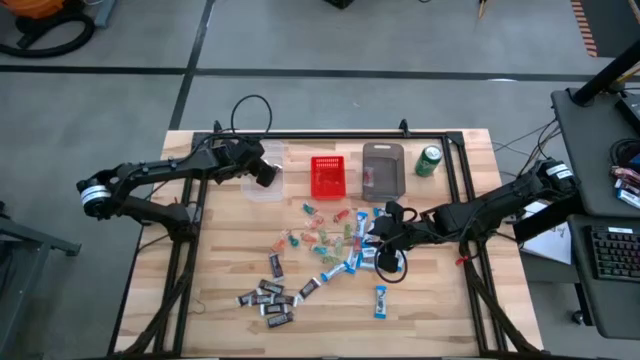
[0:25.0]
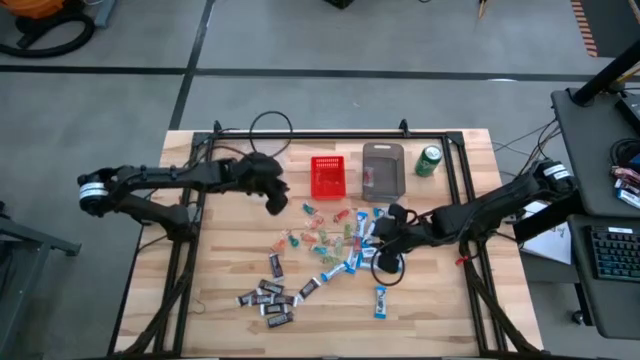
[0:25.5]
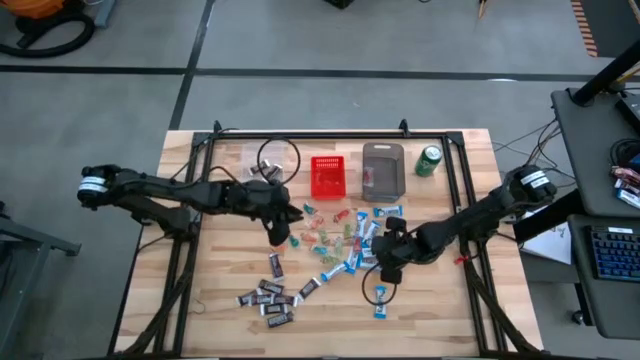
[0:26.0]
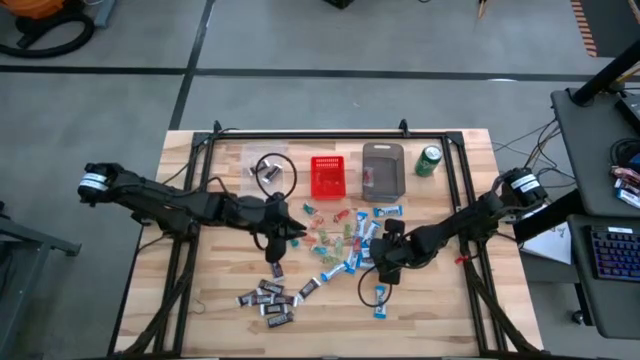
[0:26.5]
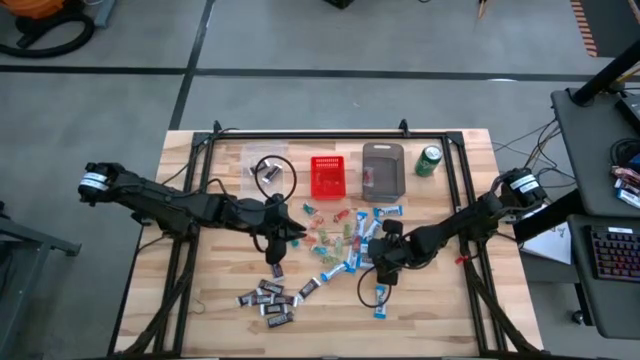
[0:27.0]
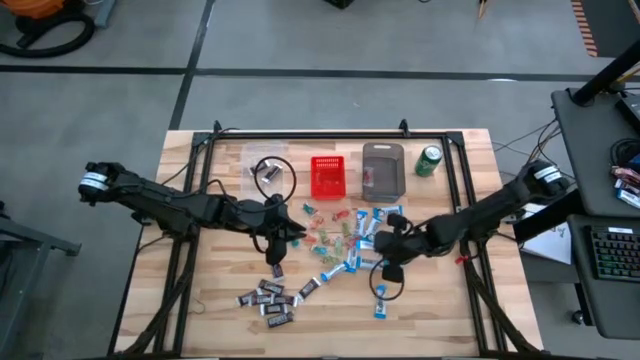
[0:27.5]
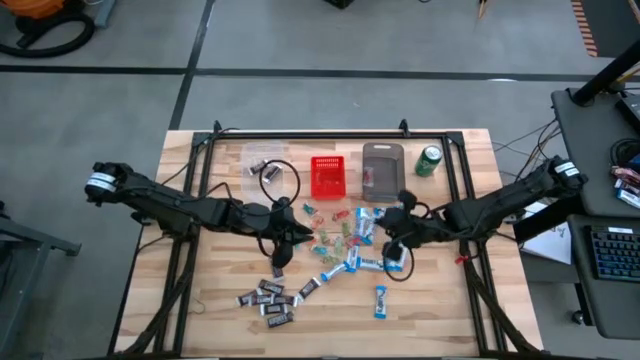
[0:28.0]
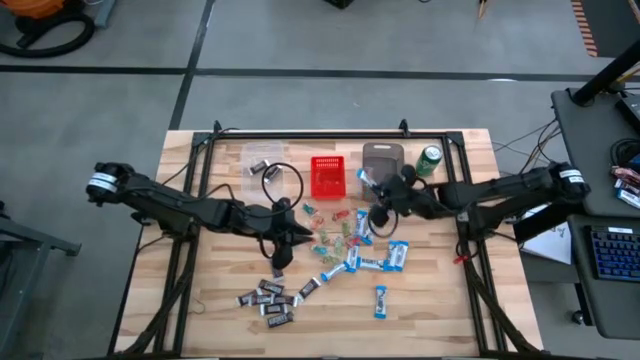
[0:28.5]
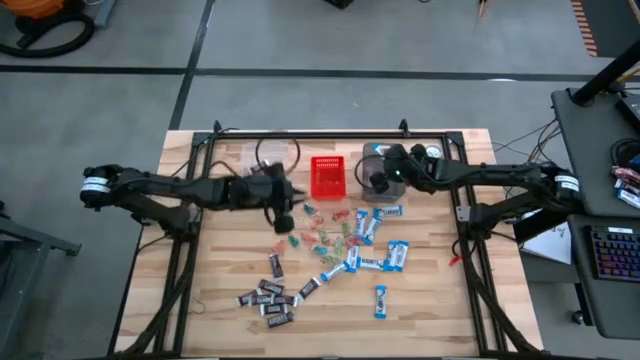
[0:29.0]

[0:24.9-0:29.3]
Task: Sort candy
Put the white chocolate bar into the red bin

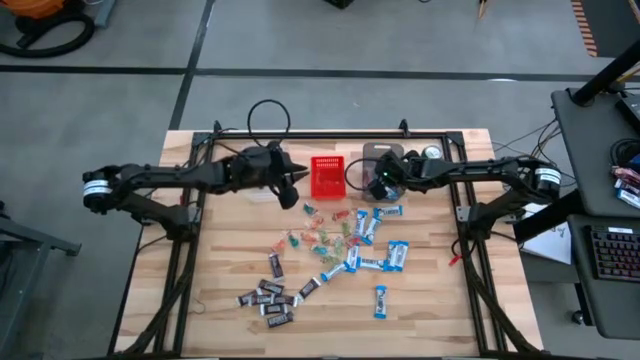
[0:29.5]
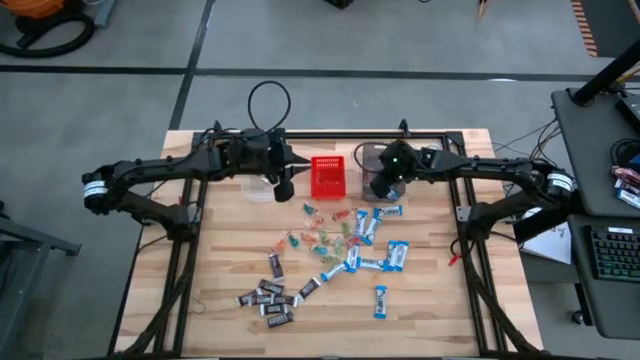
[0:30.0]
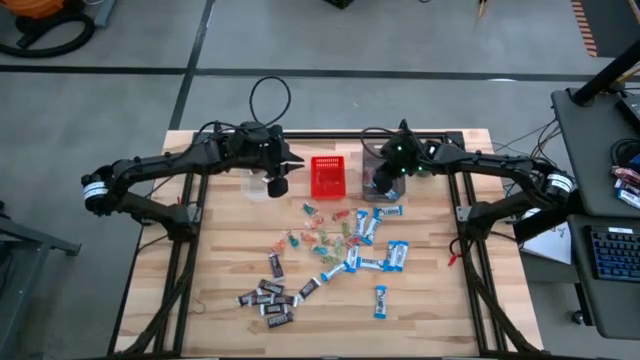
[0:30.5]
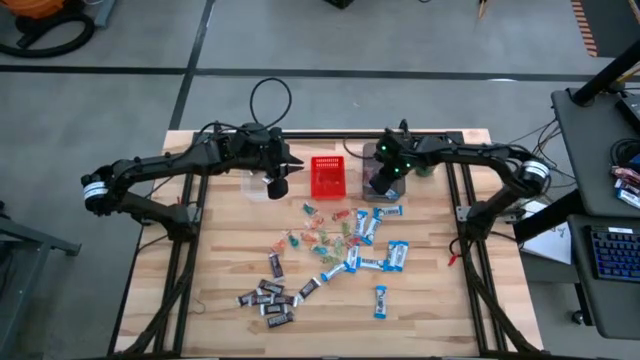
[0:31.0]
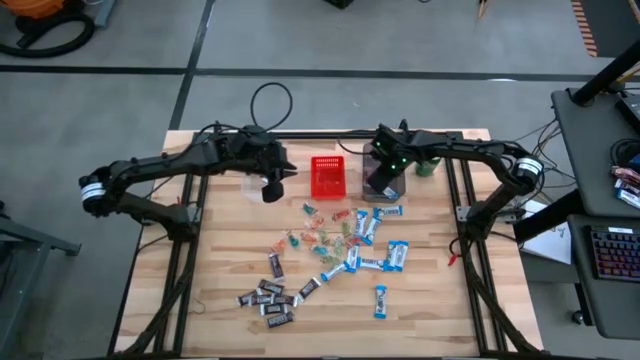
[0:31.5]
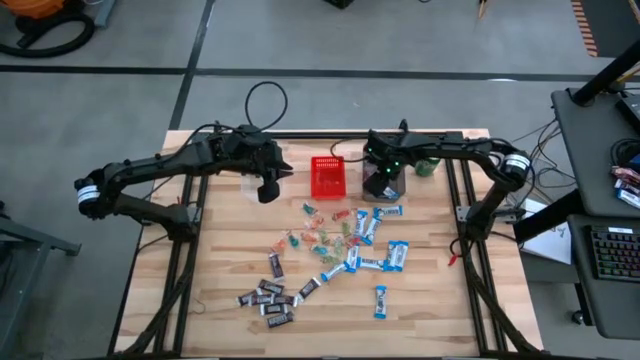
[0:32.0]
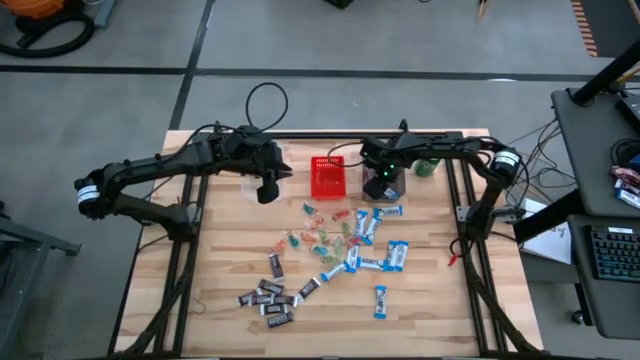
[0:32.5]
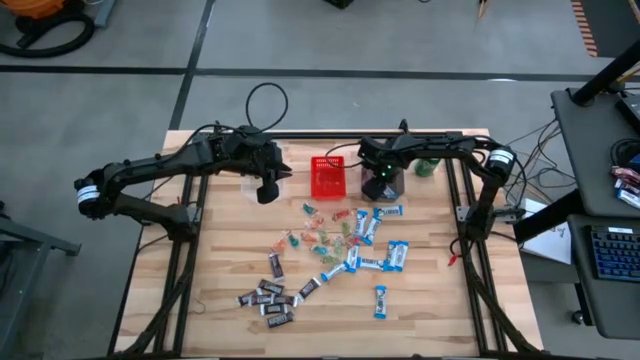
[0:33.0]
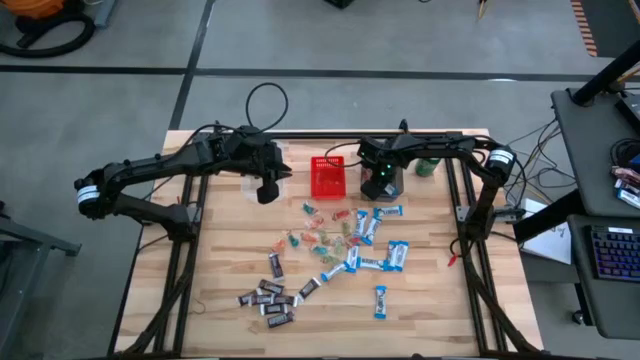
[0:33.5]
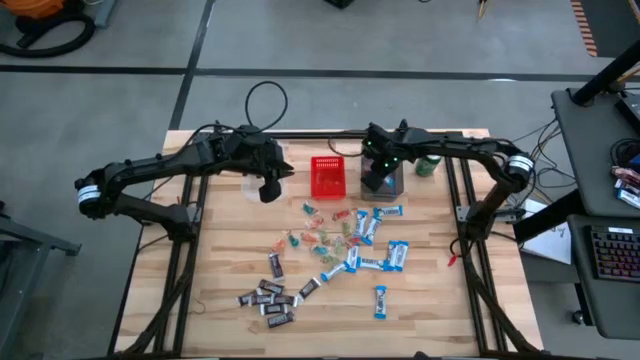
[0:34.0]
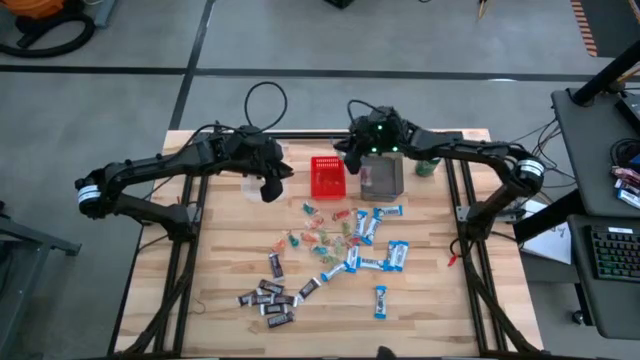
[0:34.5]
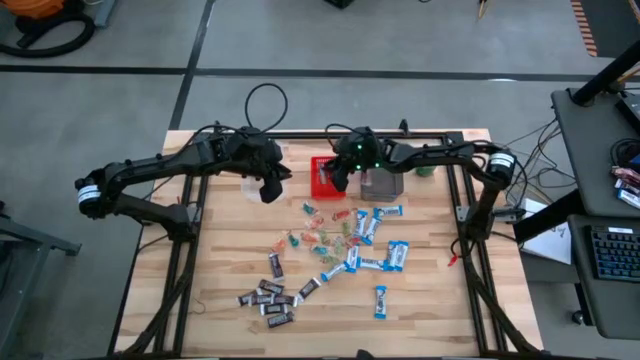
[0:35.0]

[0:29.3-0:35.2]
Put the white chocolate bar into the red bin

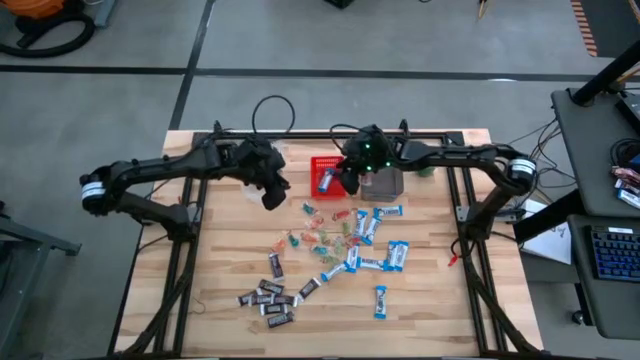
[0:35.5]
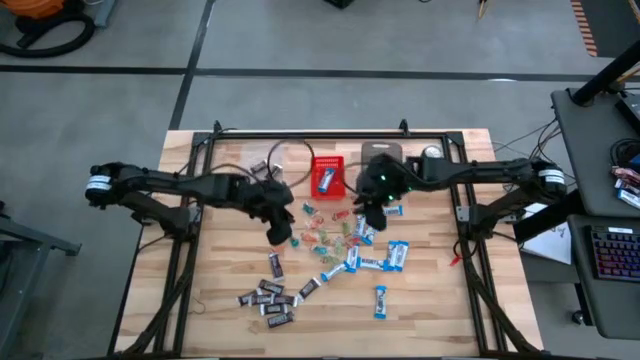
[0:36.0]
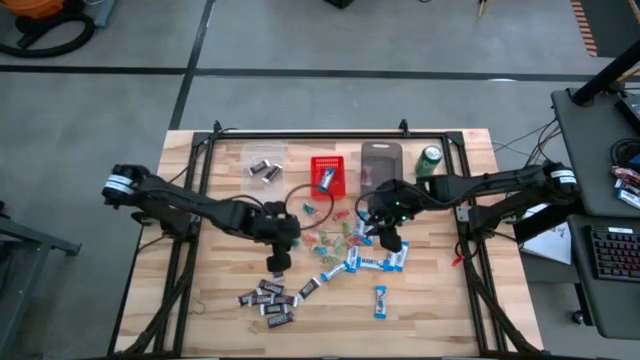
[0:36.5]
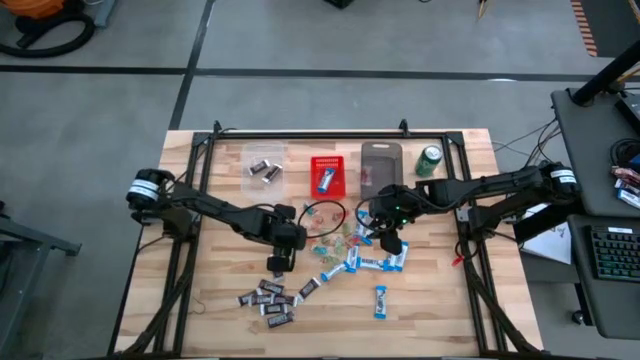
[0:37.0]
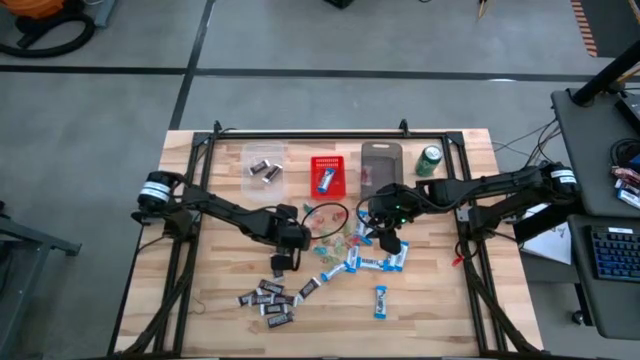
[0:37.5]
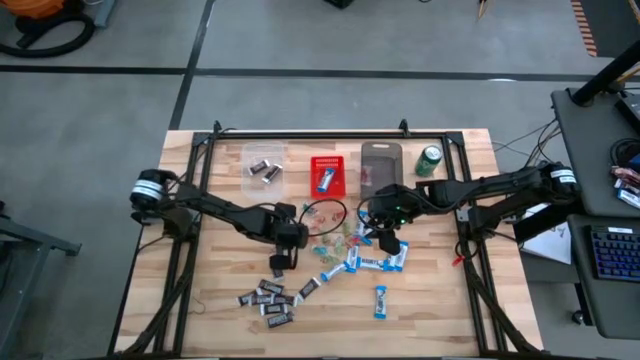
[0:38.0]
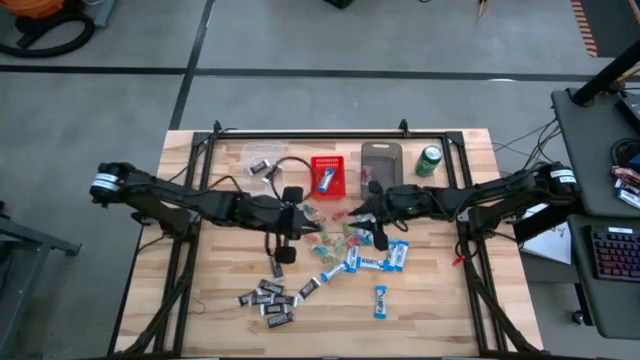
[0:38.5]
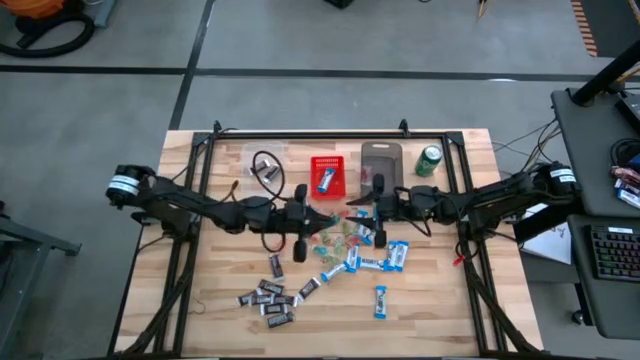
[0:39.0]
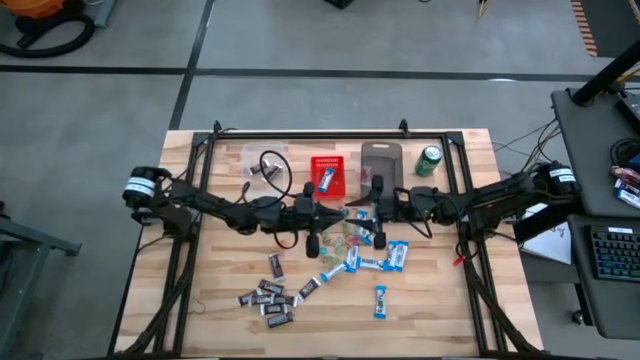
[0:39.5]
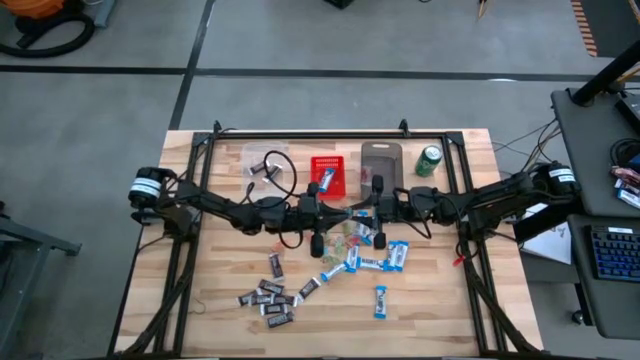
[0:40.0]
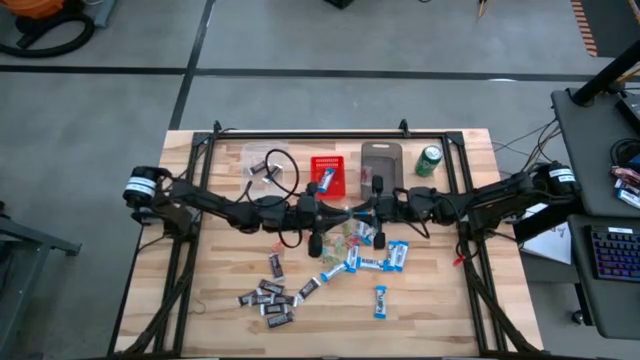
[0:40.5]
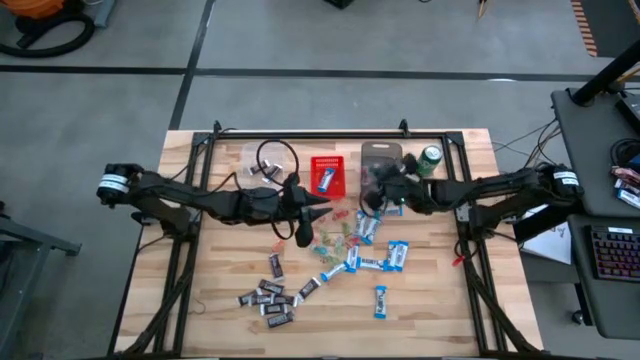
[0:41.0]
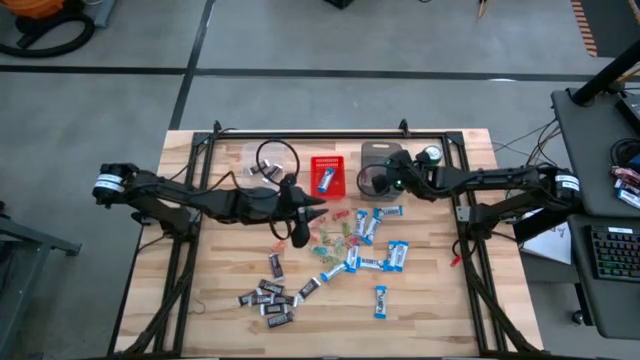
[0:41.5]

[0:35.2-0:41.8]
Put the blue gummy candy into the black bin

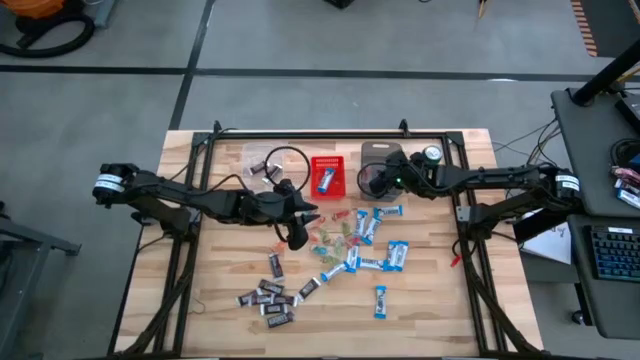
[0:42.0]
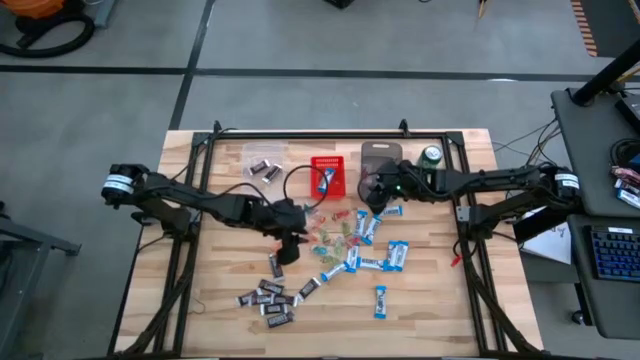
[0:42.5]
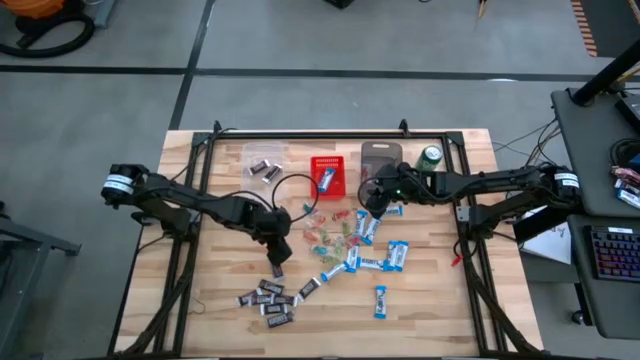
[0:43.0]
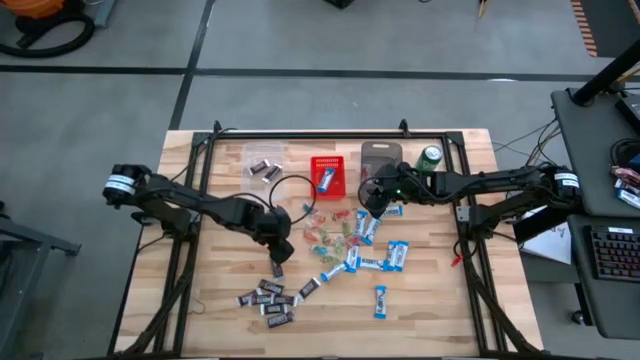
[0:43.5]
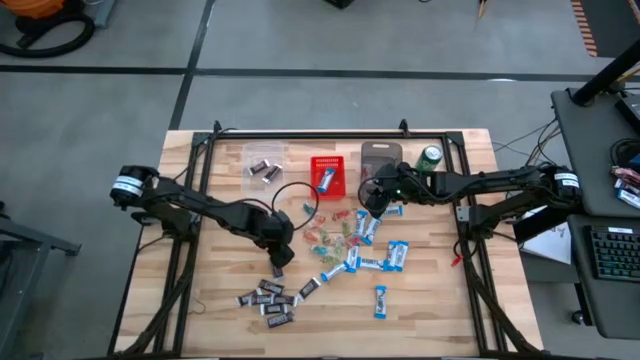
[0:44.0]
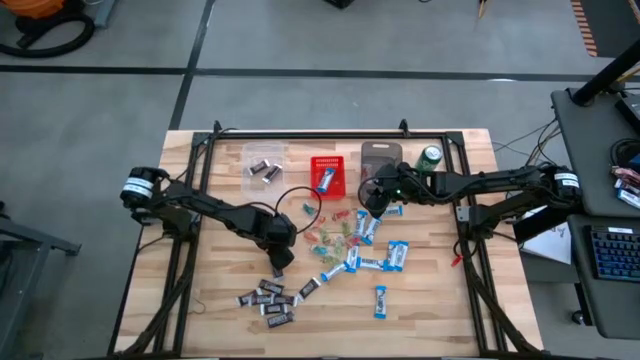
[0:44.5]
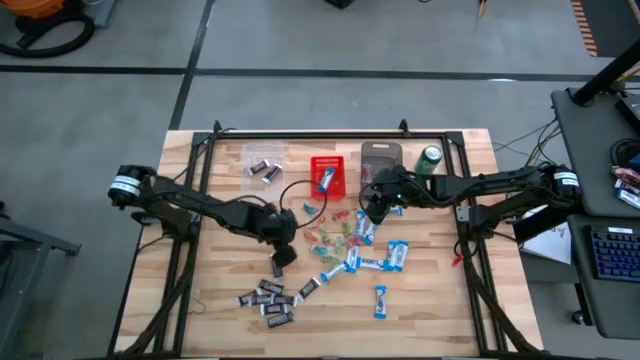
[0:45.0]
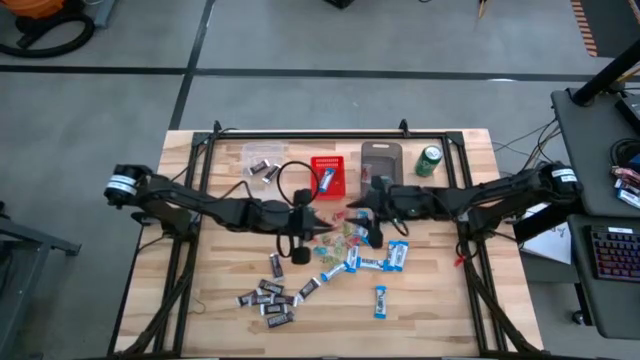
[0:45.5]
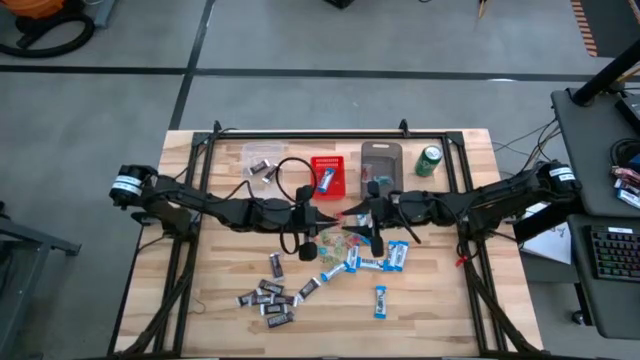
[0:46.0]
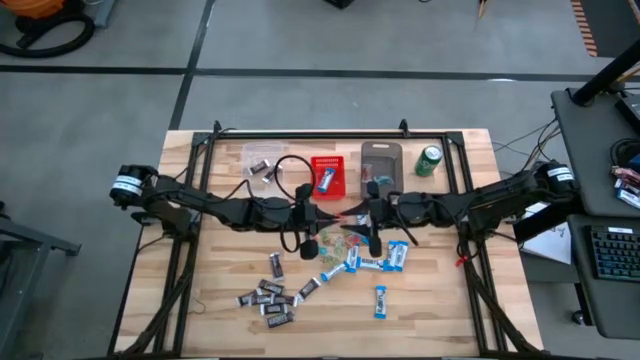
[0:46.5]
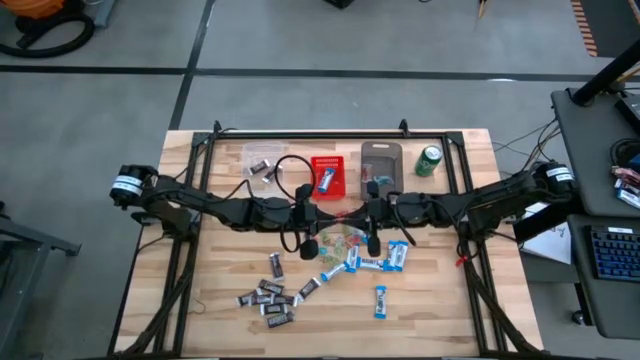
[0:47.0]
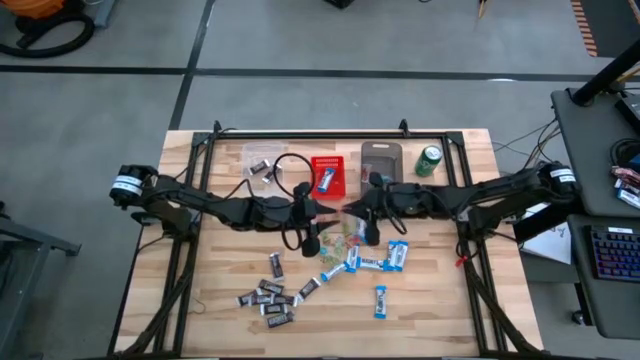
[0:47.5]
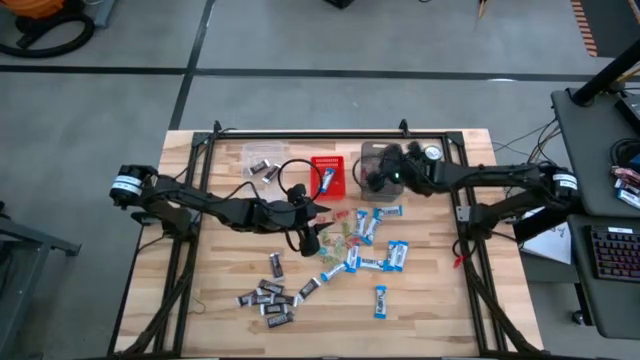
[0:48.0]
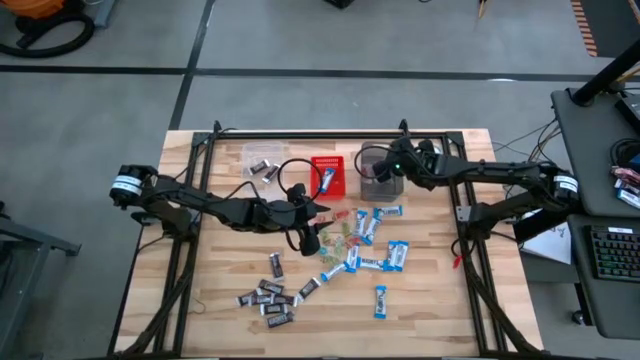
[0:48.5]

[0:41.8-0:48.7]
Put the orange gummy candy into the black bin
